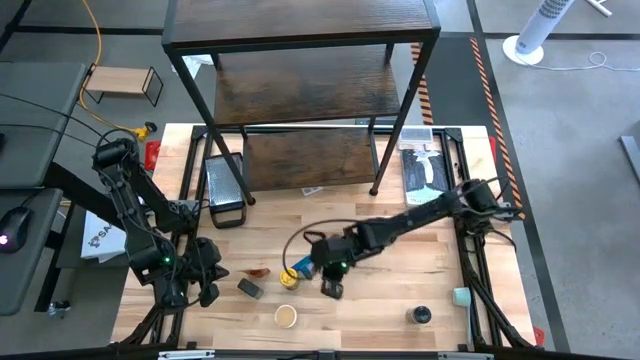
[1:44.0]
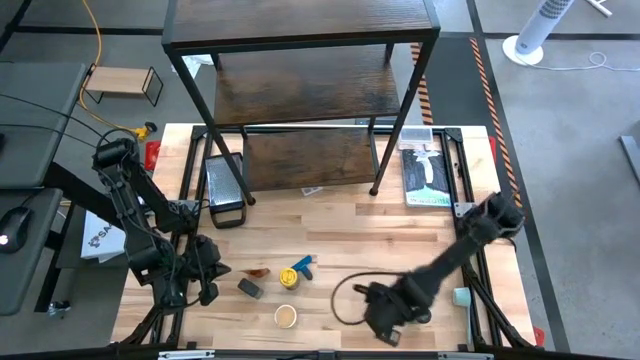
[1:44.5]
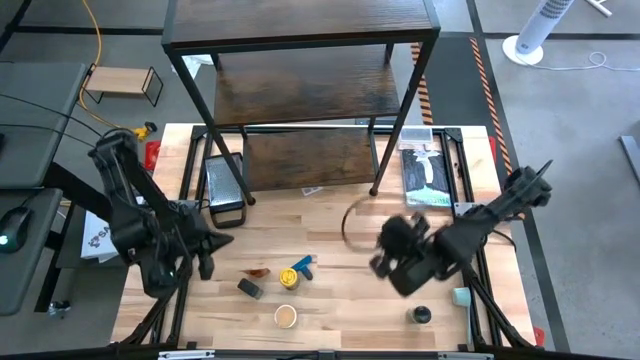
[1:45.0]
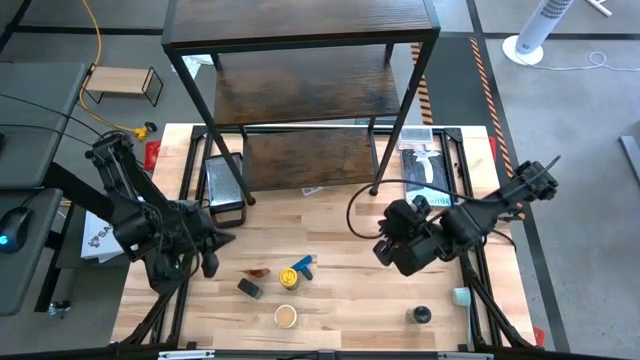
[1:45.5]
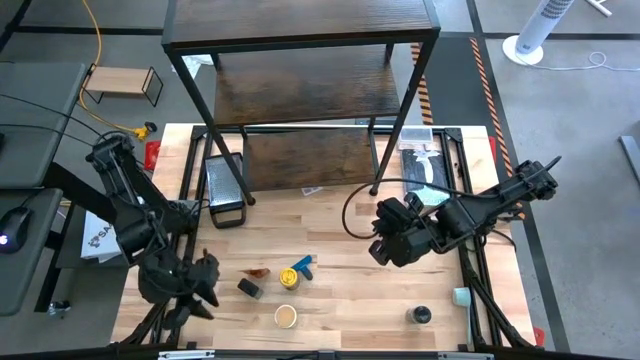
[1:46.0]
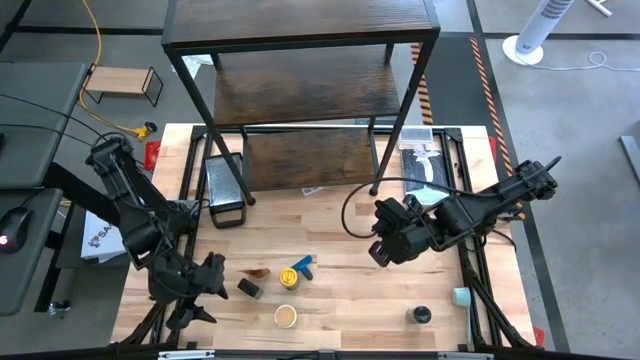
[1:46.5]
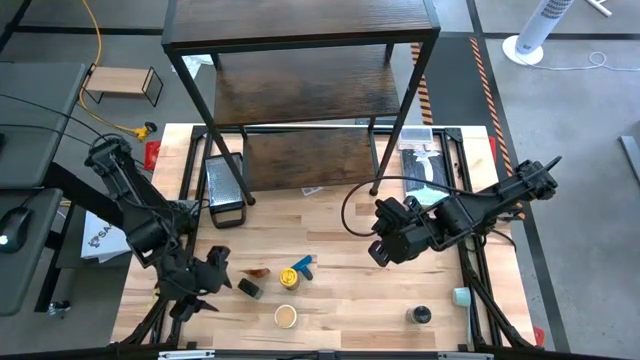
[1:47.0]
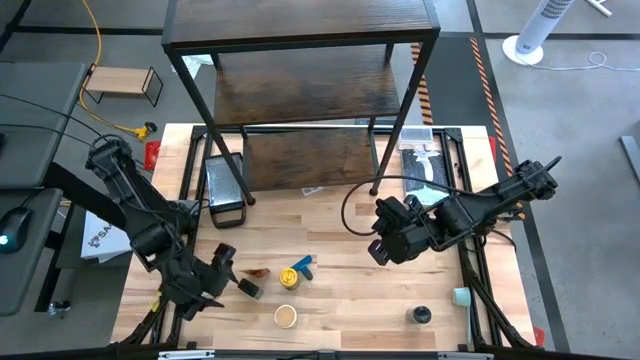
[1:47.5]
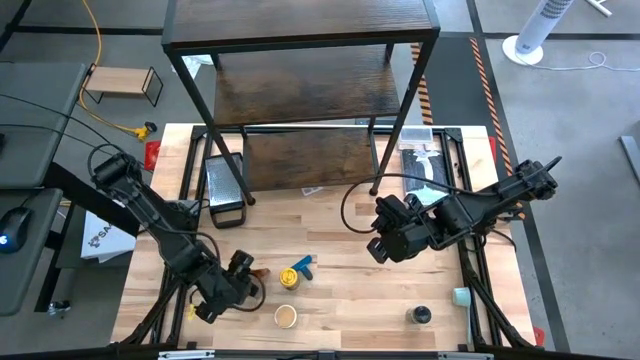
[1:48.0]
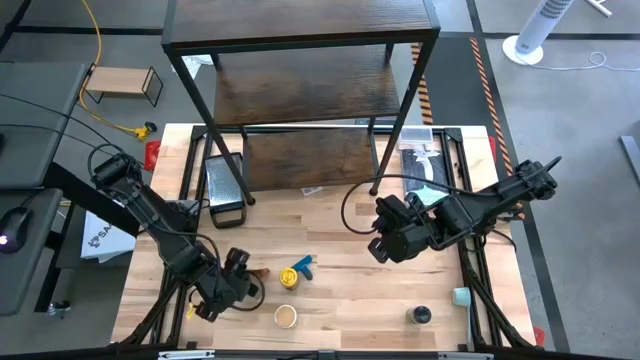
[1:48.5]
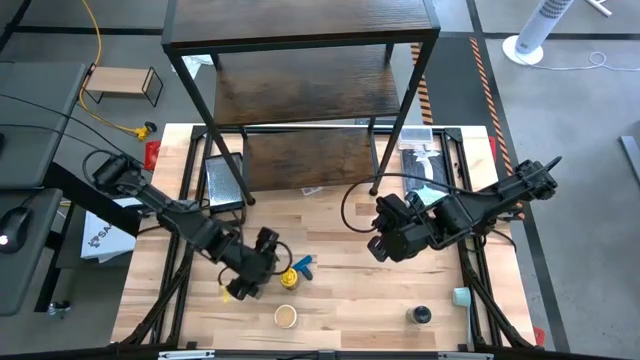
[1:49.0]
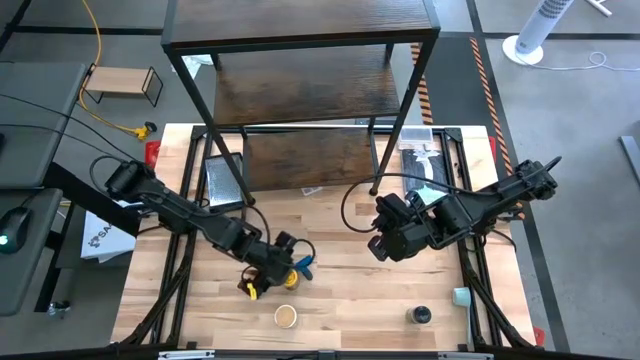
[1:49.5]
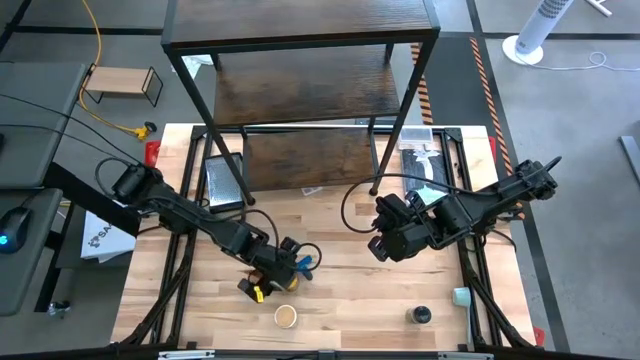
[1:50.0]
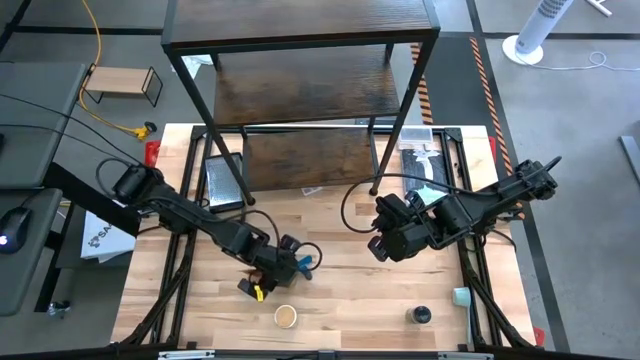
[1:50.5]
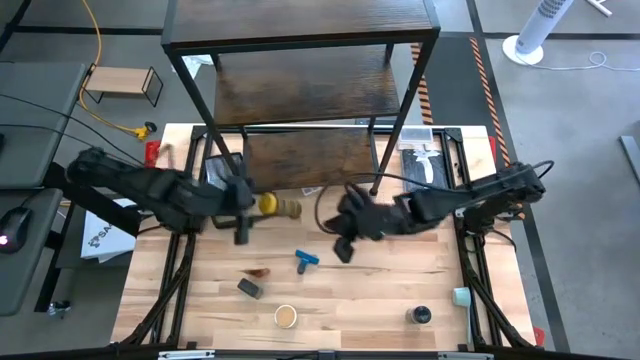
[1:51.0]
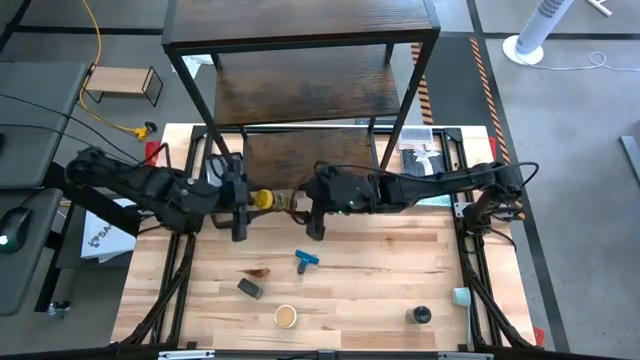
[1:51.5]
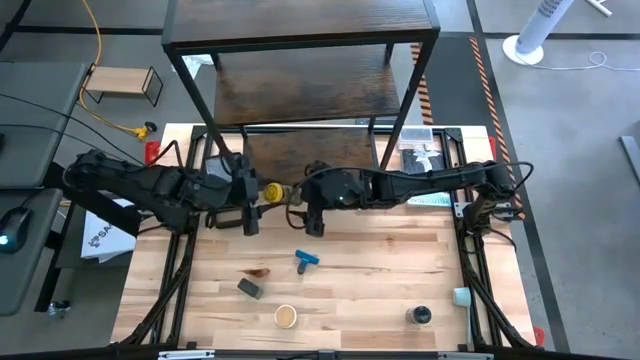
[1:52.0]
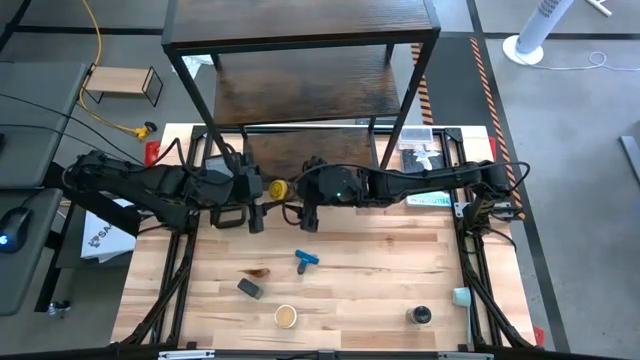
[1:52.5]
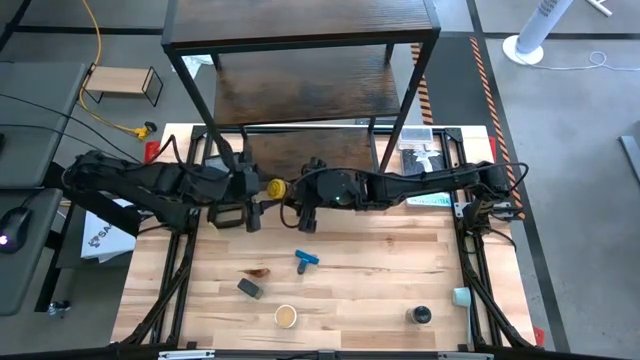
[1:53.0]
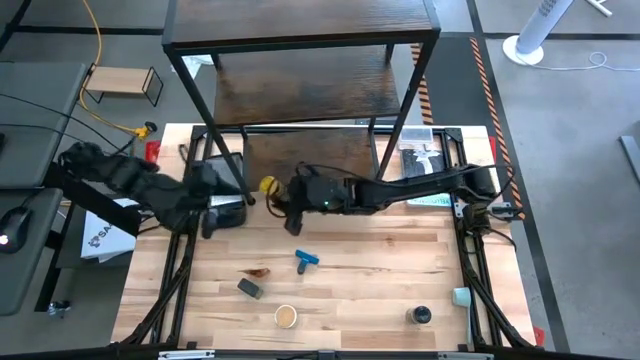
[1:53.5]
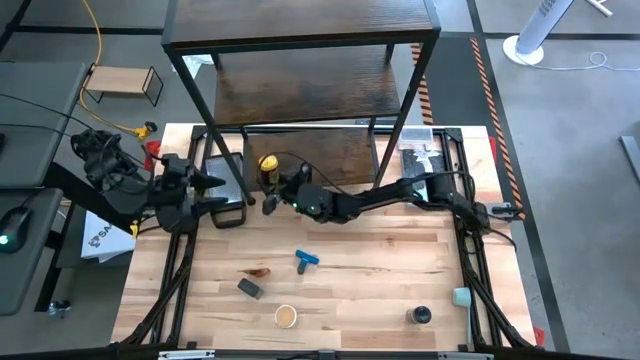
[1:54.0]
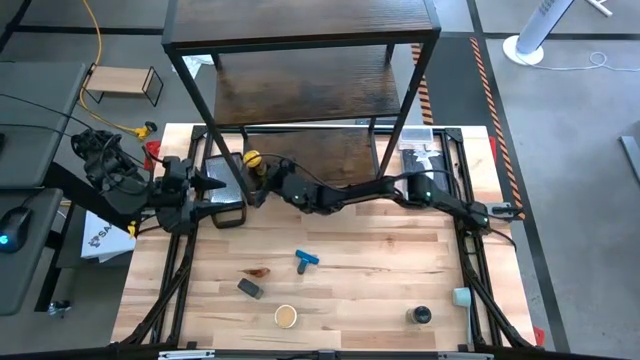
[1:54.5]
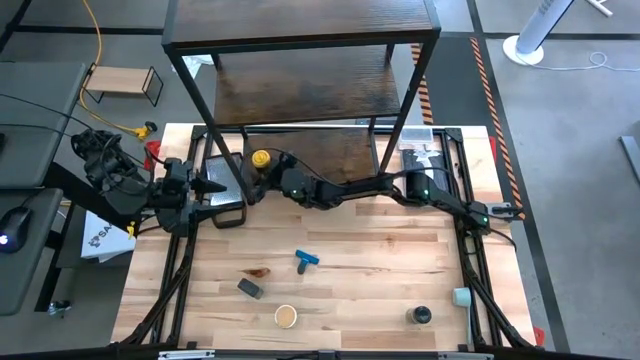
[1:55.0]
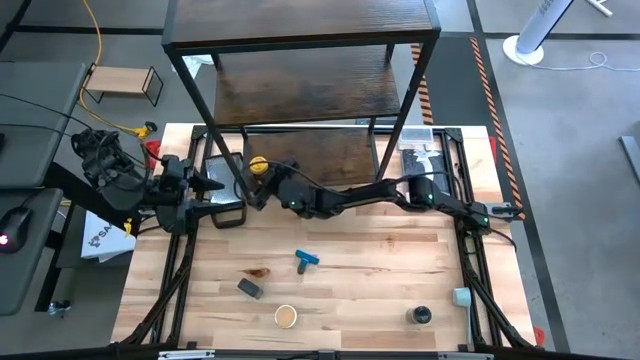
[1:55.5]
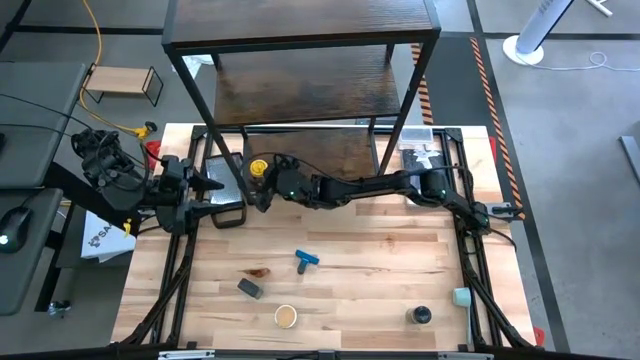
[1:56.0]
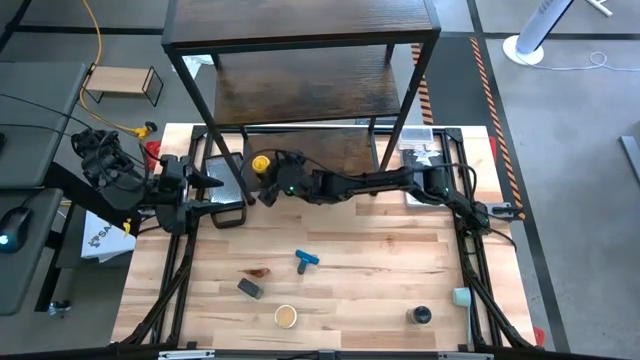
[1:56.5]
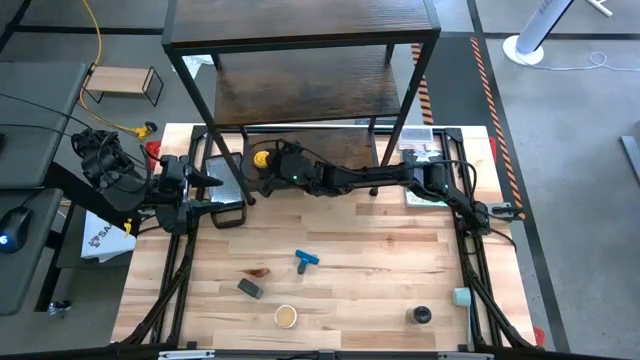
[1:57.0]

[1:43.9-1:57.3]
Task: Shelf spices
Put the yellow seasoning can on the shelf

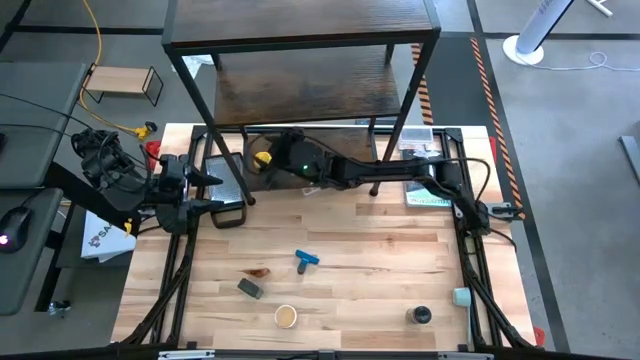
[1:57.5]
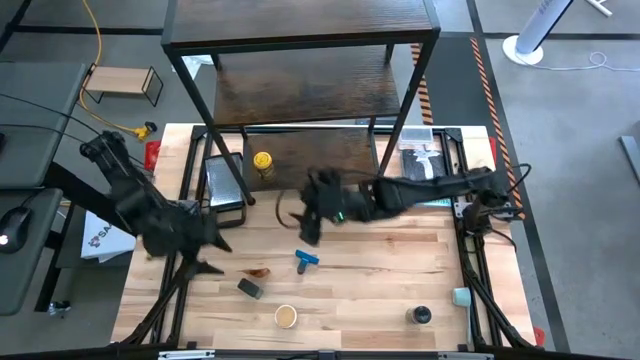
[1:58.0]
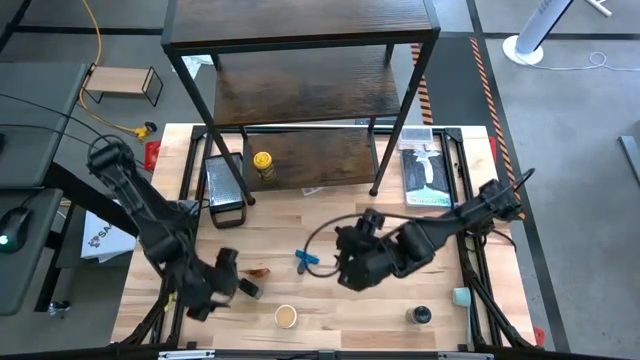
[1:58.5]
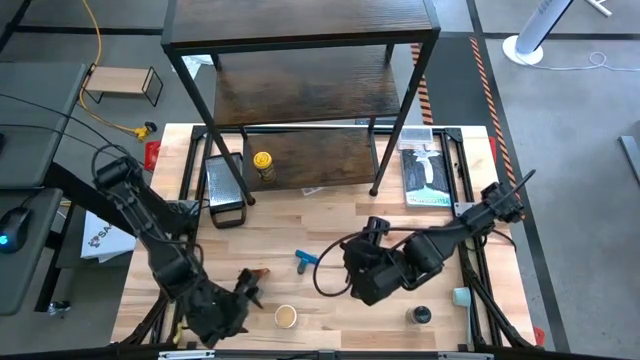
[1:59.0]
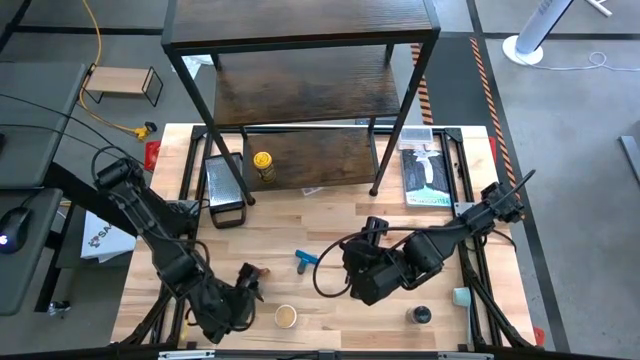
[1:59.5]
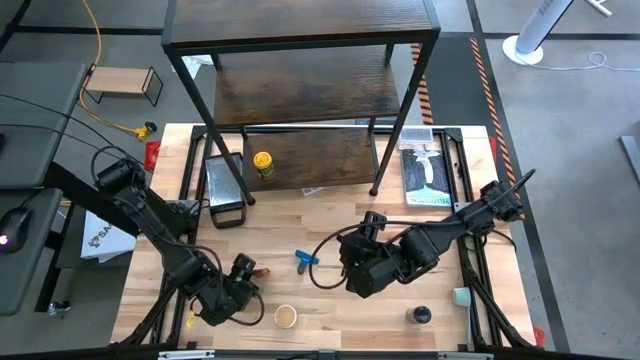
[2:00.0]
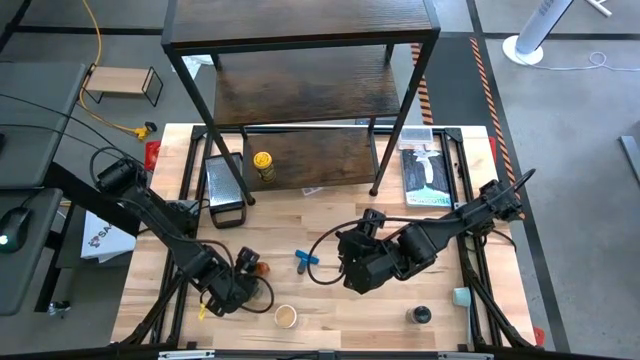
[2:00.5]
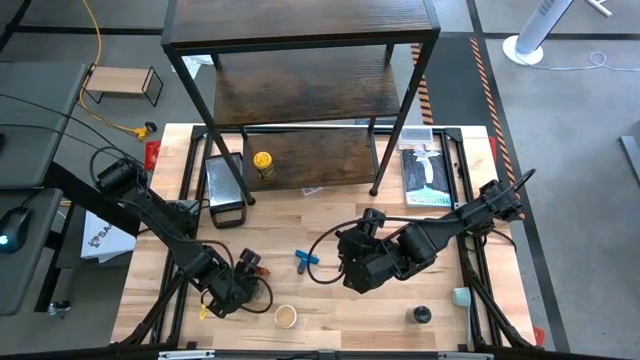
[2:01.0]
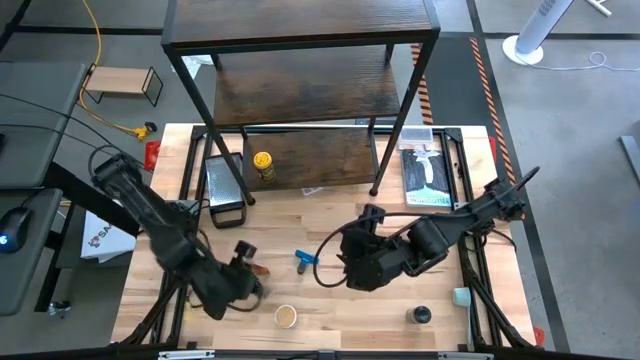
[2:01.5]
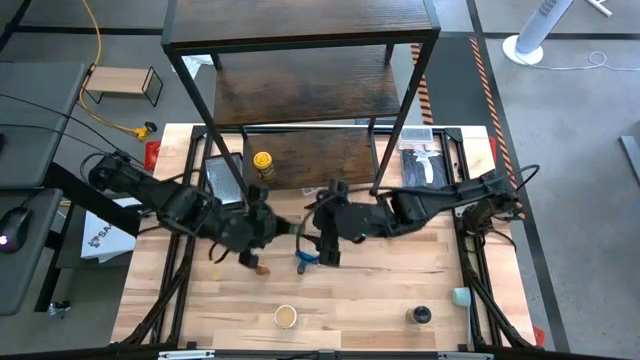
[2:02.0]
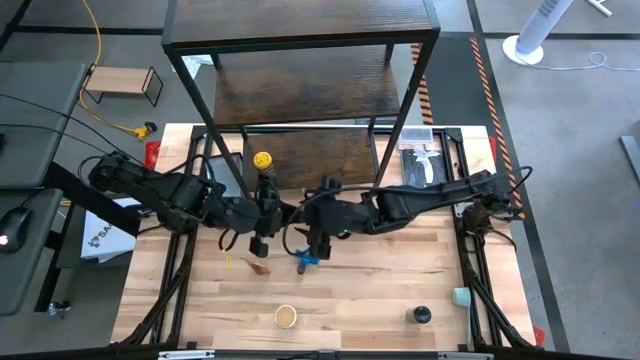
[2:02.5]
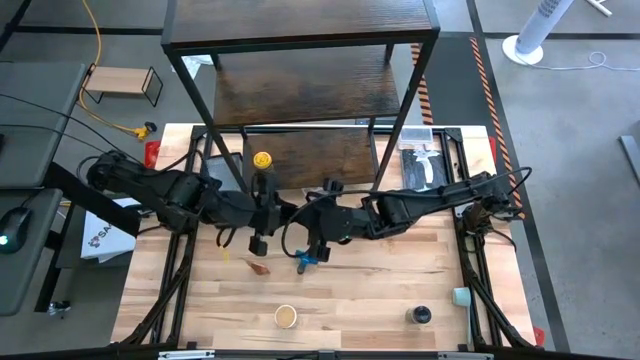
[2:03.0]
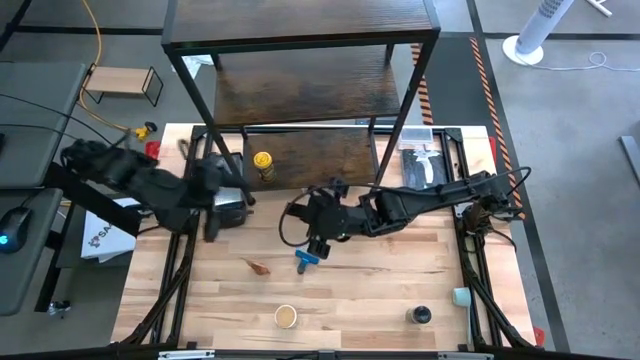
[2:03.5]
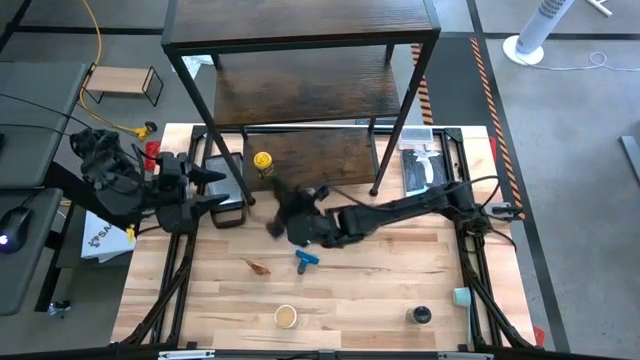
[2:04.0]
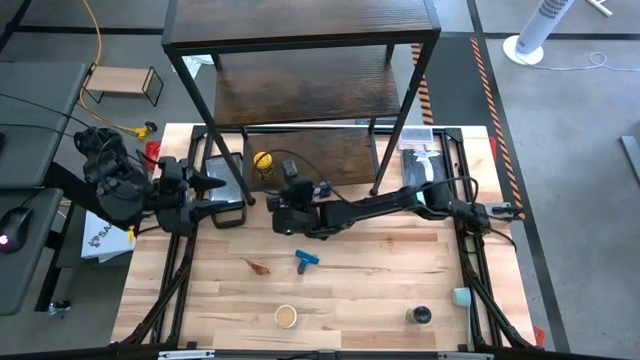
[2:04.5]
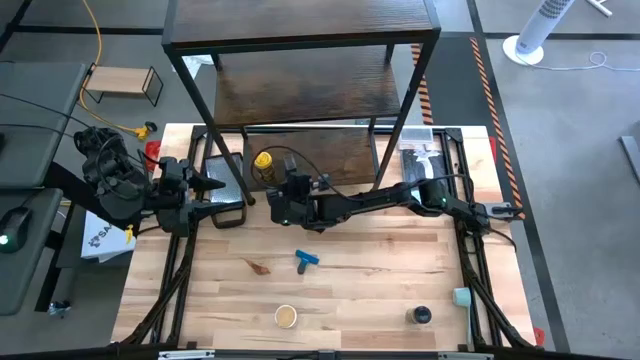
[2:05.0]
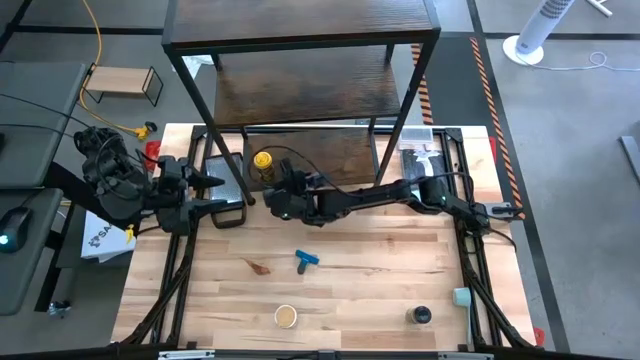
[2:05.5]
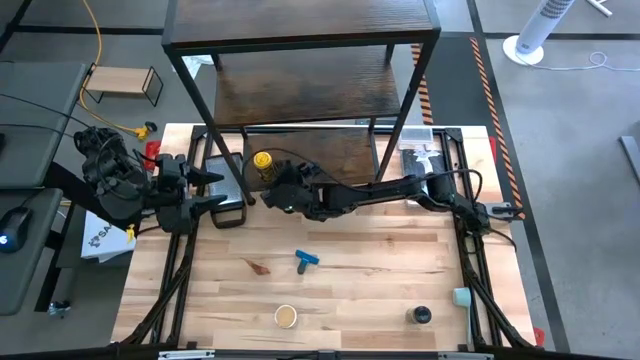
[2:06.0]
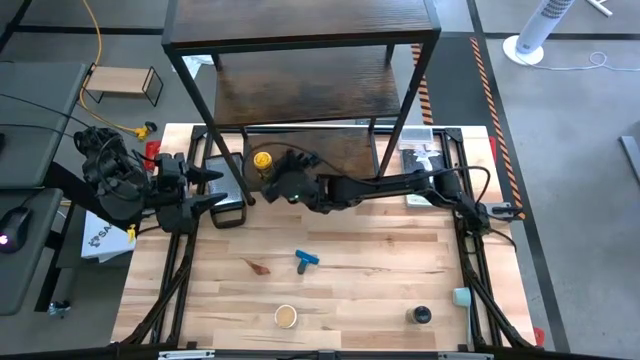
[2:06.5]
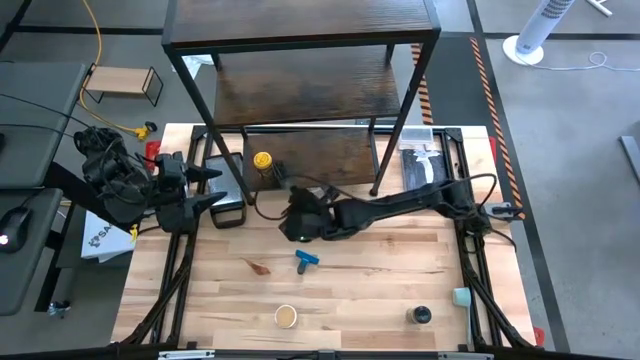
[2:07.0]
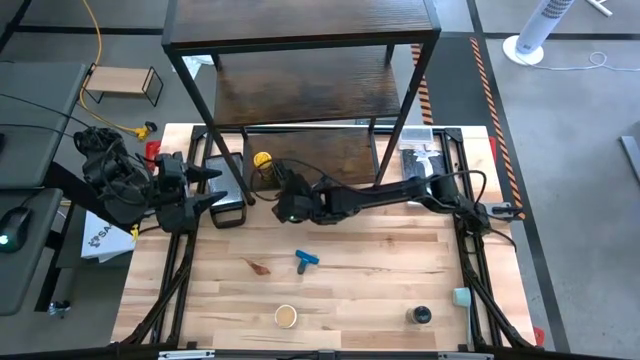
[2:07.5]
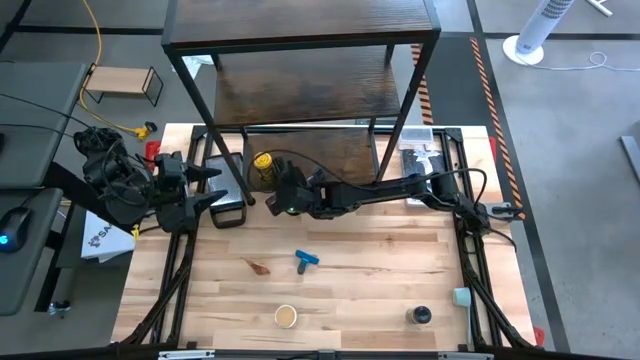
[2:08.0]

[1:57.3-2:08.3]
Put the green seasoning can on the shelf
